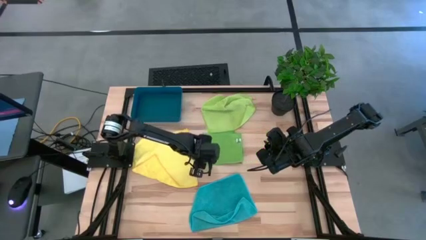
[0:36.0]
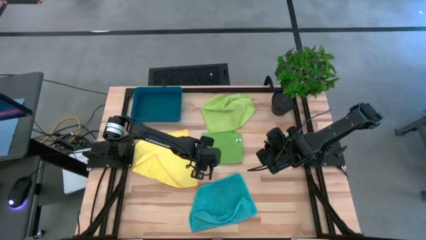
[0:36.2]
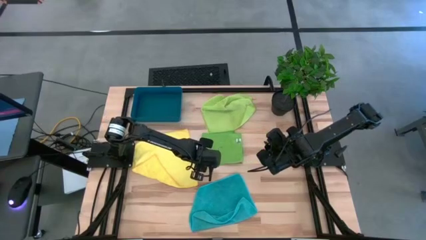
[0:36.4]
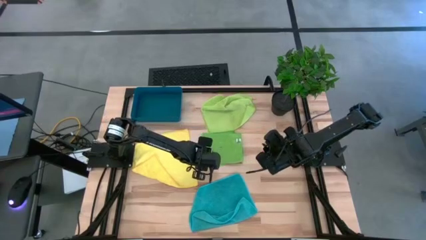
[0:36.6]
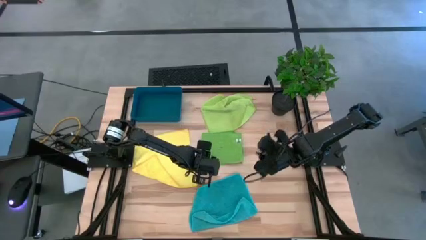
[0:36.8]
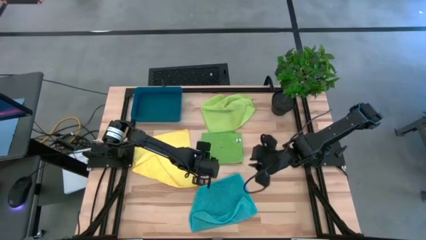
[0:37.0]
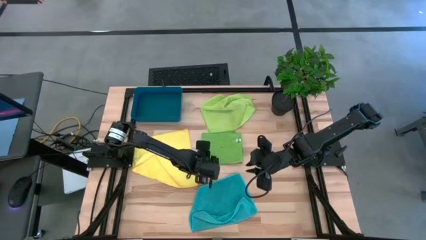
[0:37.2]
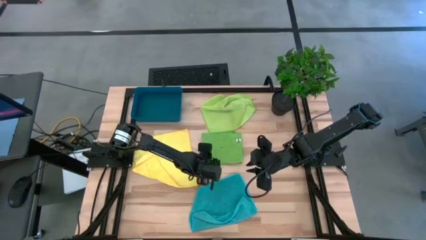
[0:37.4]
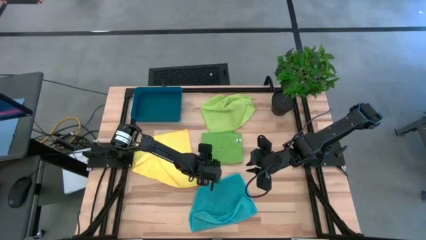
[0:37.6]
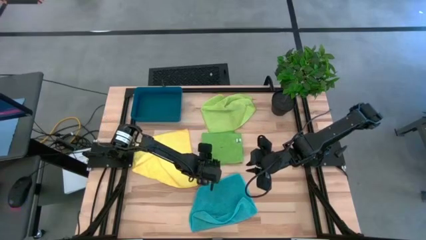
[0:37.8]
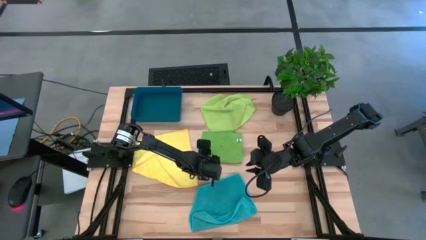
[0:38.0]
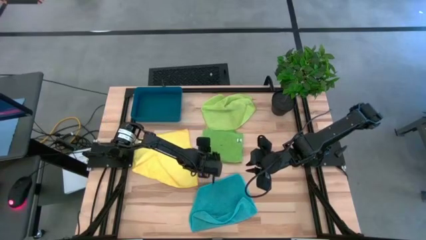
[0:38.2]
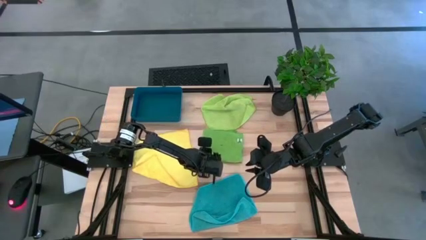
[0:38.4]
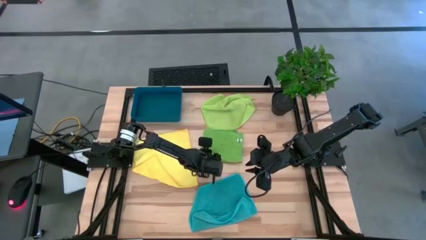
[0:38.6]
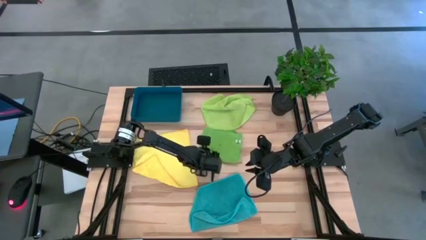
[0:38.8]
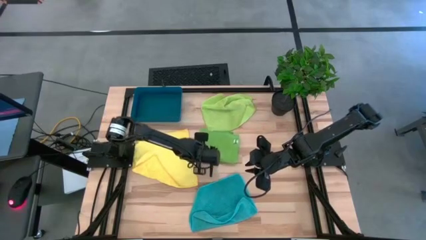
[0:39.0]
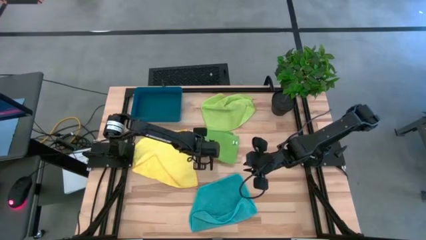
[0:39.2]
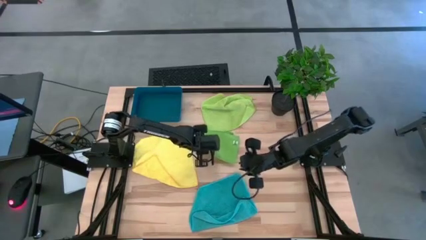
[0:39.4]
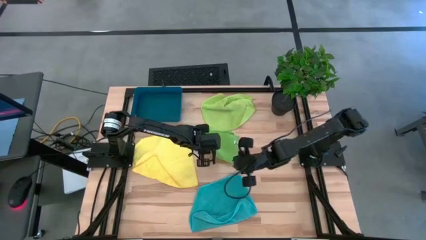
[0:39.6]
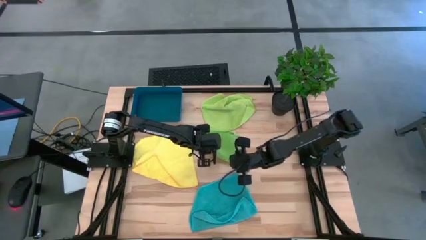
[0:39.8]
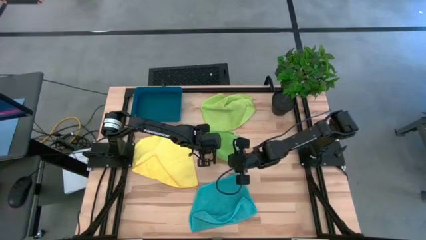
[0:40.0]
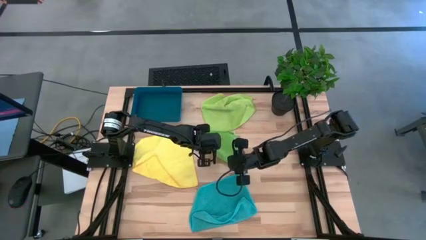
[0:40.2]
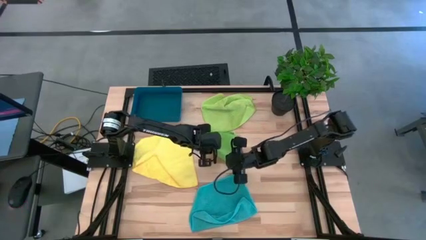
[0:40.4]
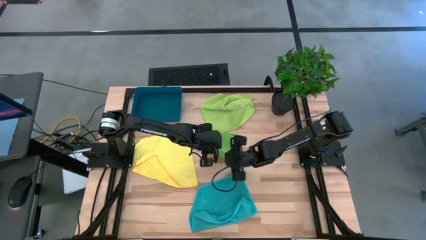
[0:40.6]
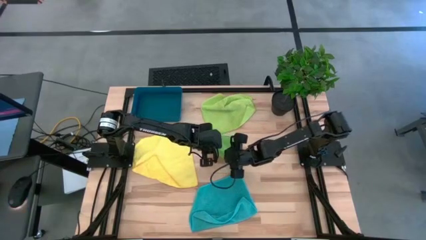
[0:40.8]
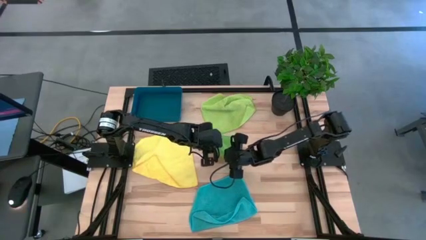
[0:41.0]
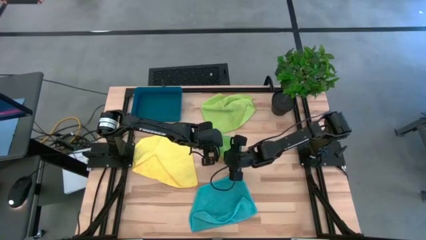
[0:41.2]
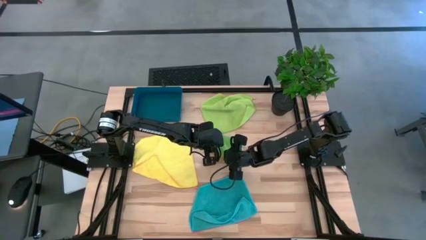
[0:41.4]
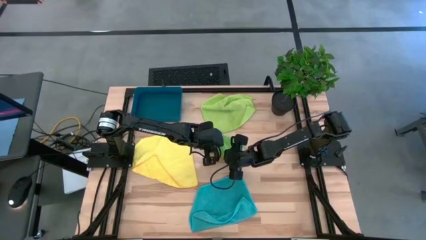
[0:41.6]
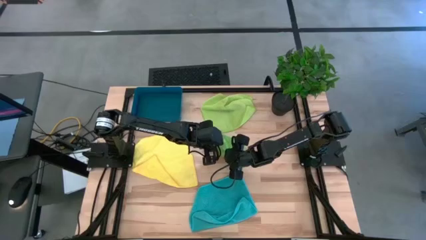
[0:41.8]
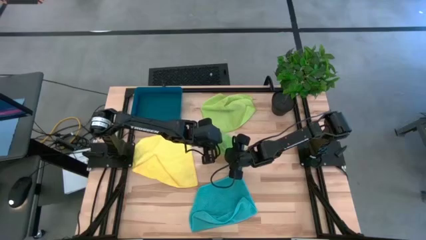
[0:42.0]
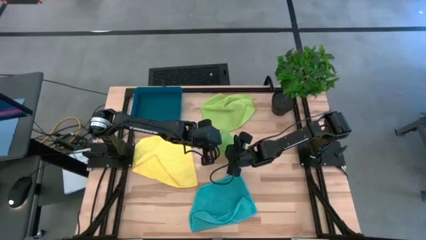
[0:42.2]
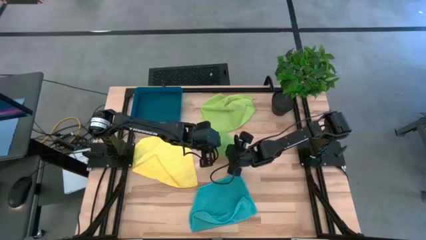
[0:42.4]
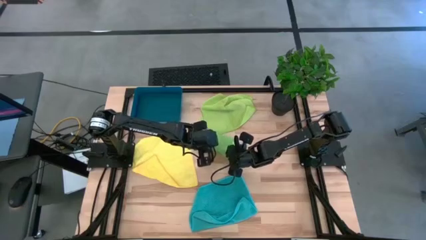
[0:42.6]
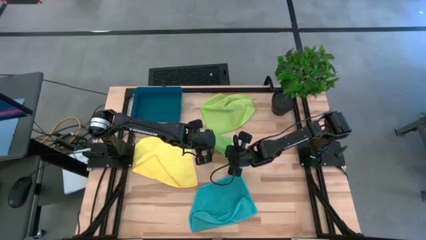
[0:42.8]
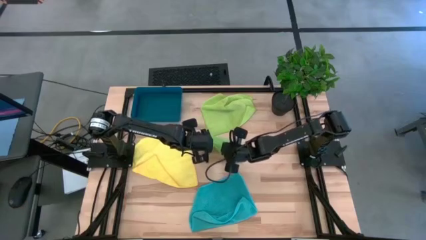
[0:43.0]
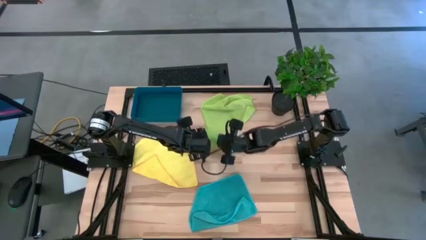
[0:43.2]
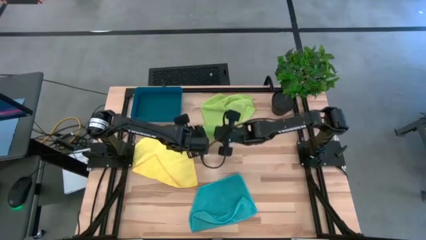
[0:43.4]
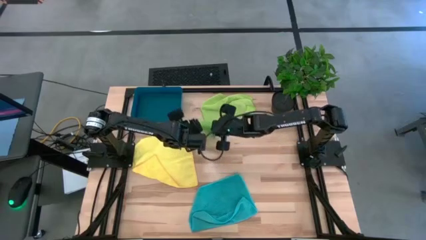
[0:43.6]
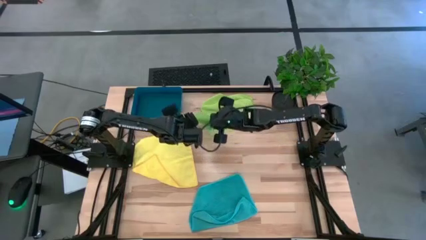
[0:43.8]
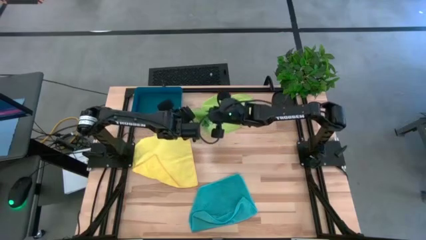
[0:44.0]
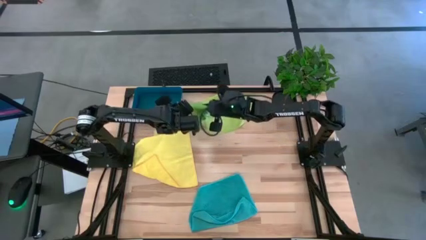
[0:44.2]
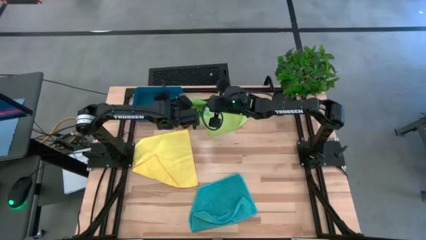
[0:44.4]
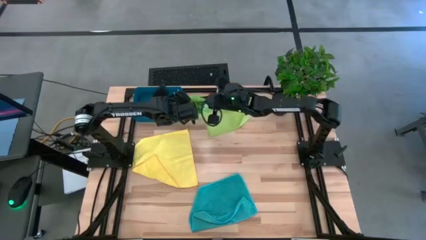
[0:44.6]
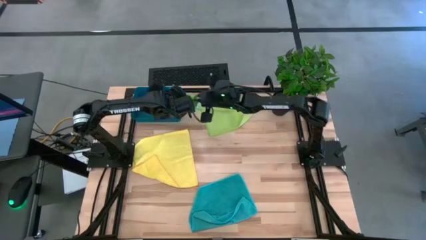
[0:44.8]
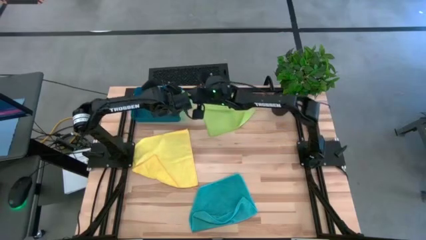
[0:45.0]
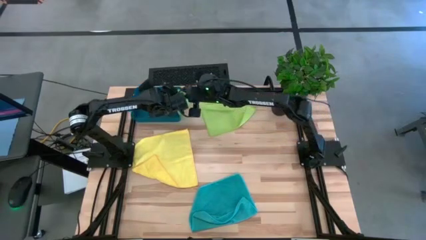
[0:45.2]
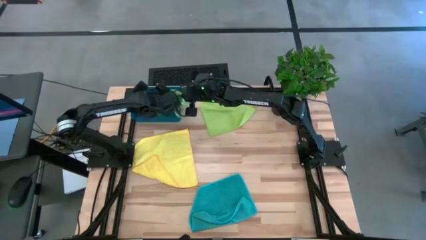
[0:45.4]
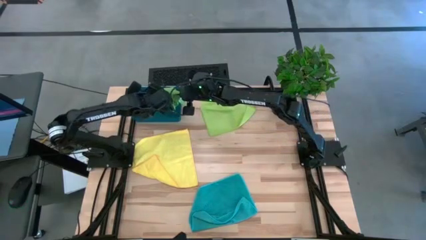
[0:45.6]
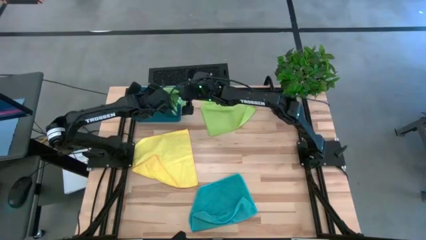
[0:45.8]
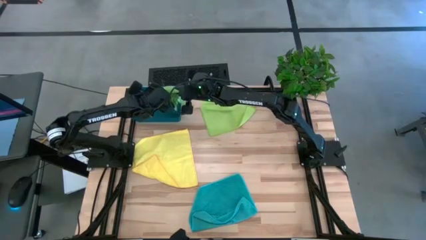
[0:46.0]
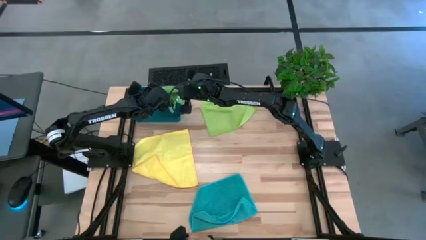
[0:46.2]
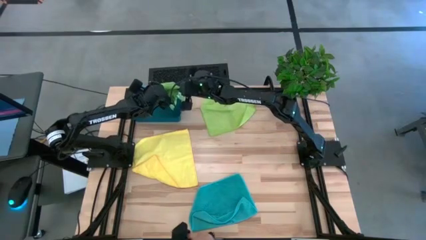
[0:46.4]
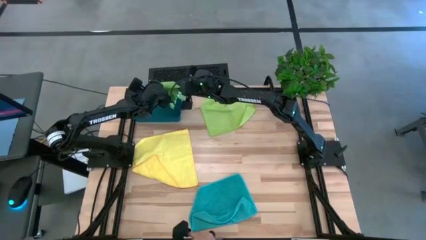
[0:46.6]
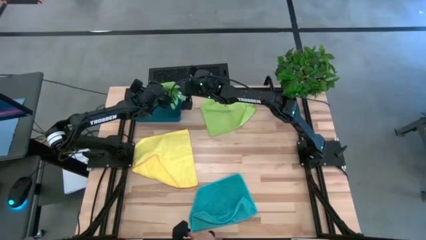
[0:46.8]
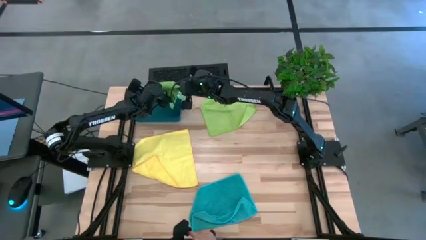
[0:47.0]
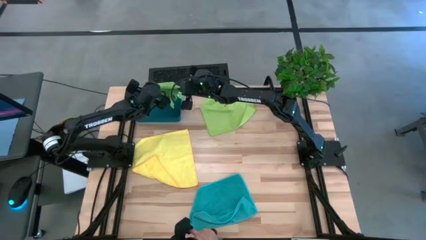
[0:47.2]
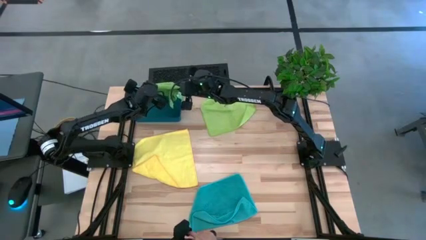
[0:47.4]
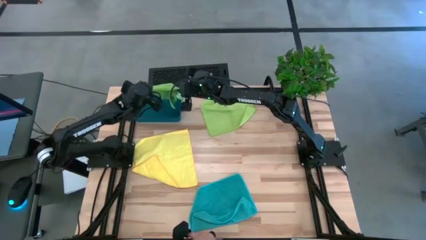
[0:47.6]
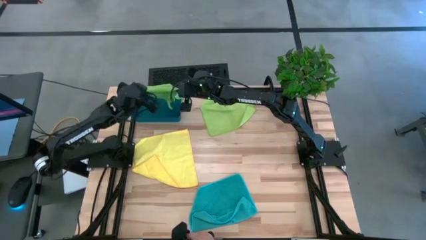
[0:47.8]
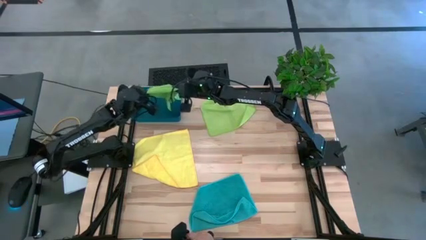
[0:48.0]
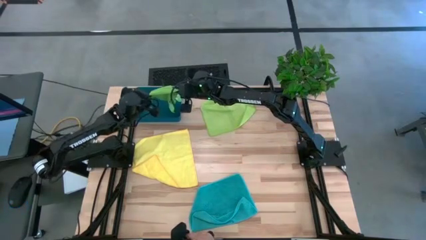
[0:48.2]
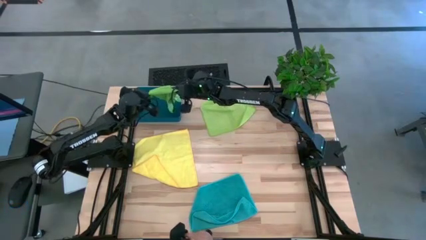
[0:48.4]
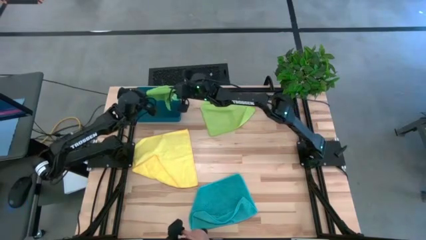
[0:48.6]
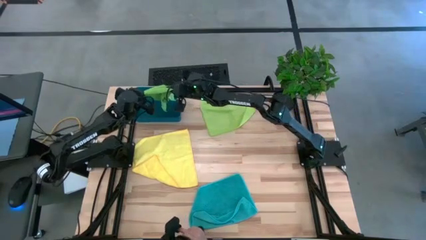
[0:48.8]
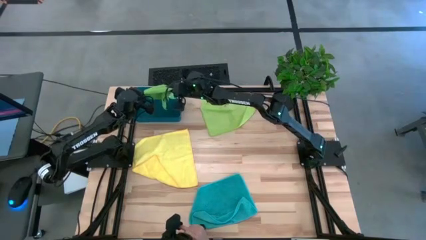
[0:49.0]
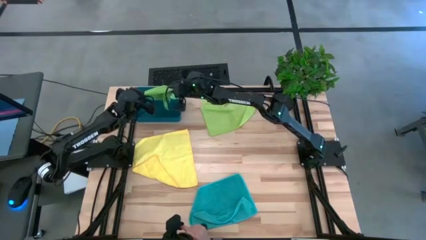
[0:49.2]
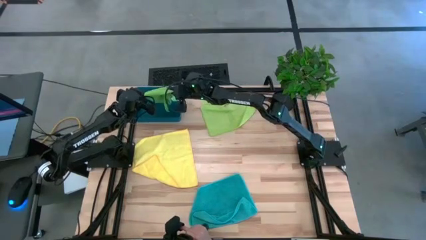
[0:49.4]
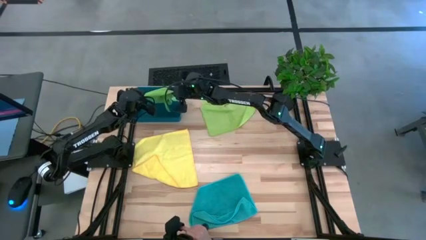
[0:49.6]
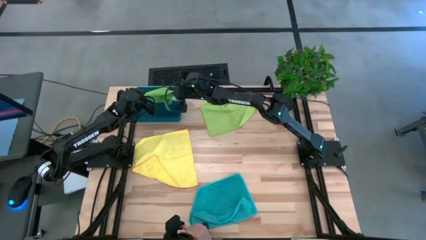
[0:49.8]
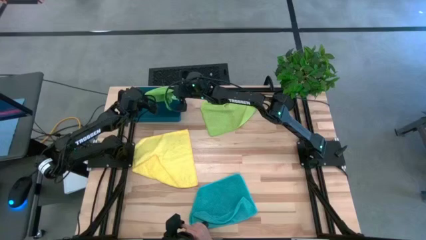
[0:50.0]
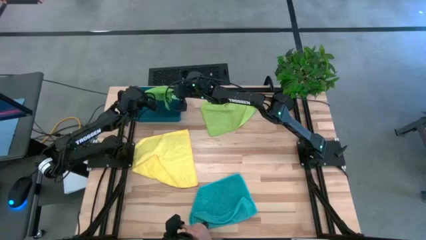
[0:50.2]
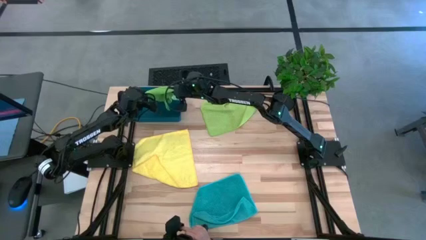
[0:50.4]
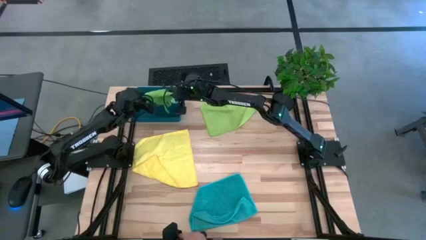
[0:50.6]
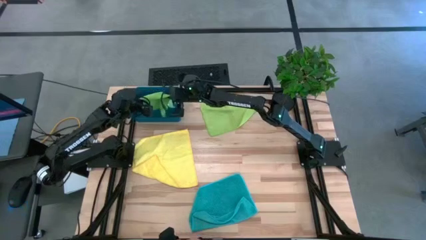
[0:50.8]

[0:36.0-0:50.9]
Task: Fold microfiber towels
Put the green towel into the blue bin
